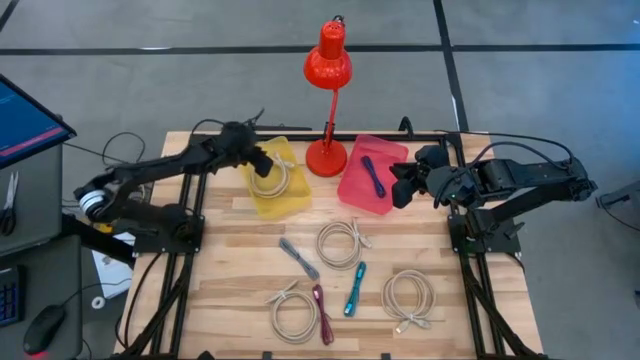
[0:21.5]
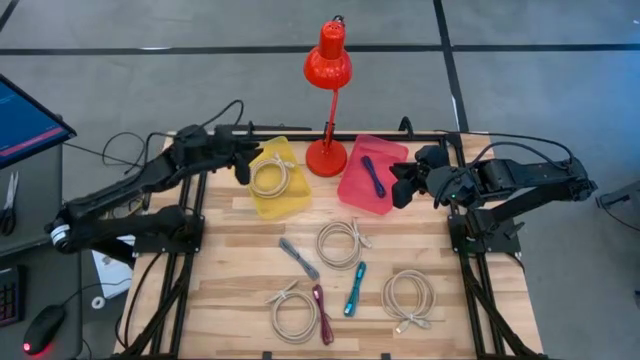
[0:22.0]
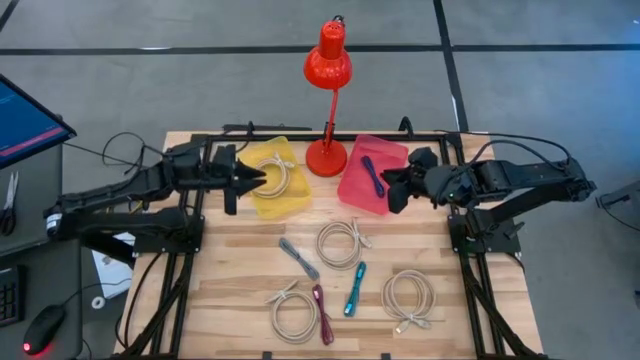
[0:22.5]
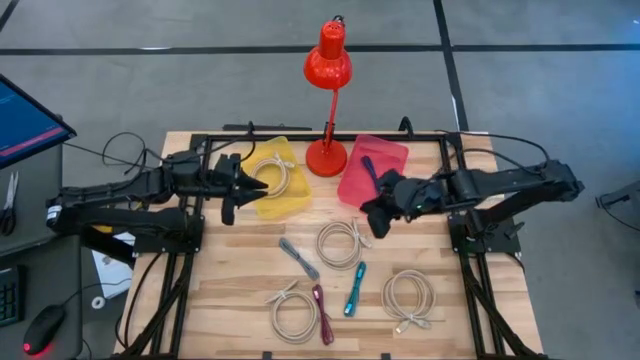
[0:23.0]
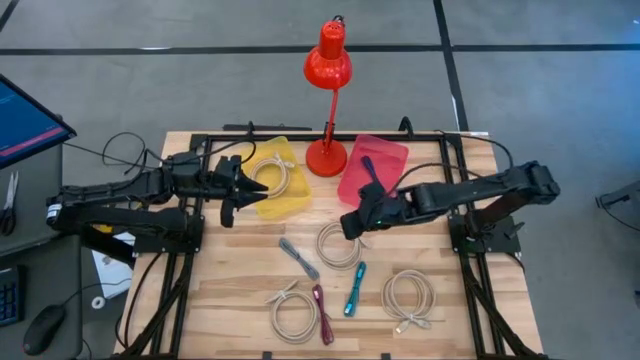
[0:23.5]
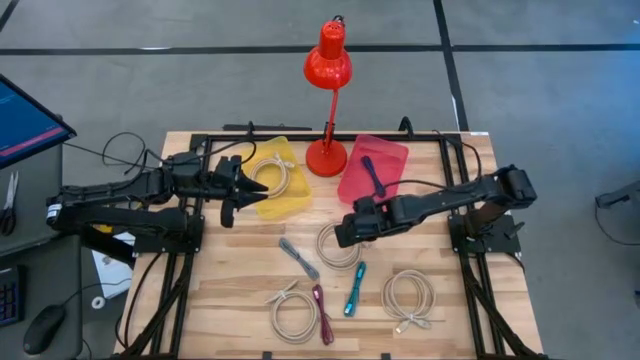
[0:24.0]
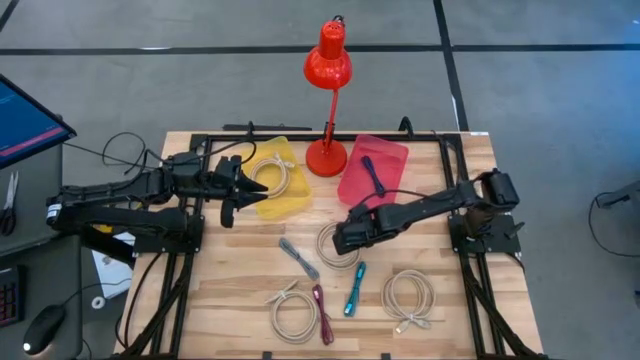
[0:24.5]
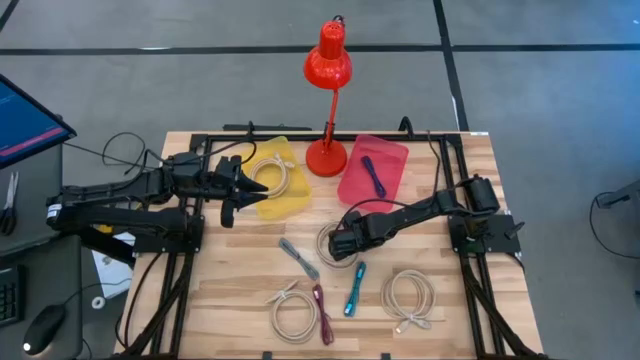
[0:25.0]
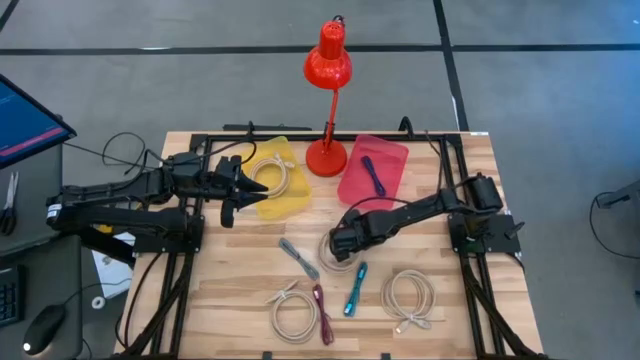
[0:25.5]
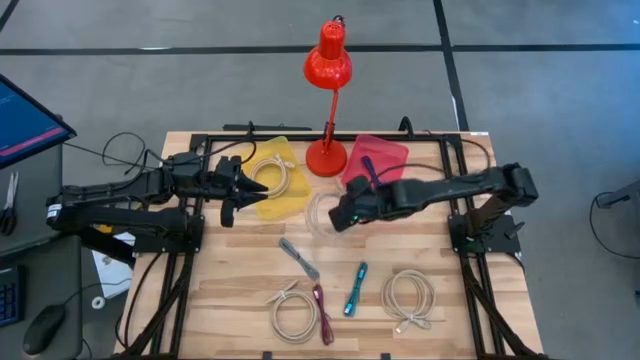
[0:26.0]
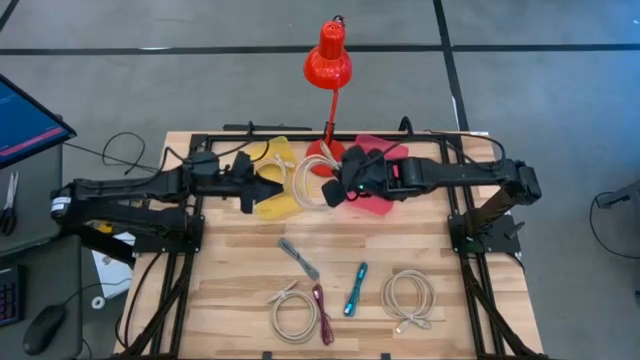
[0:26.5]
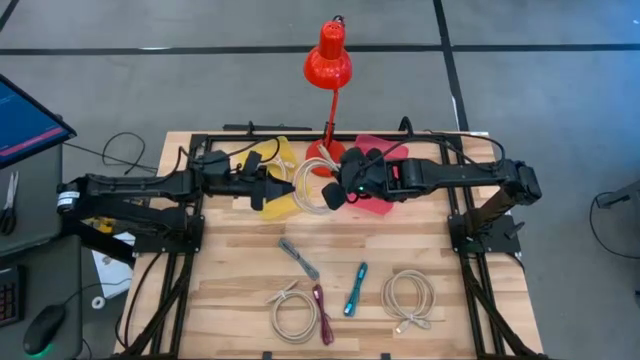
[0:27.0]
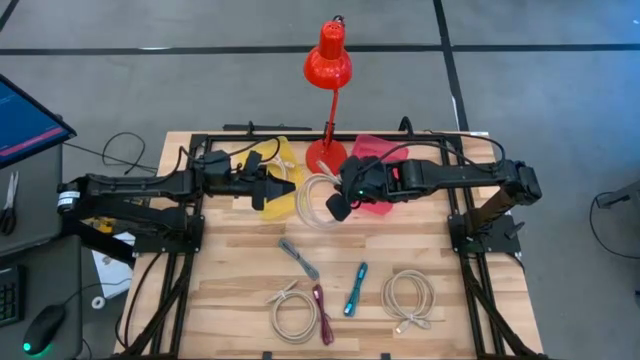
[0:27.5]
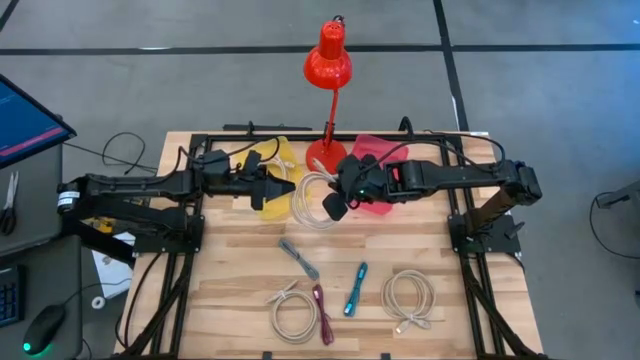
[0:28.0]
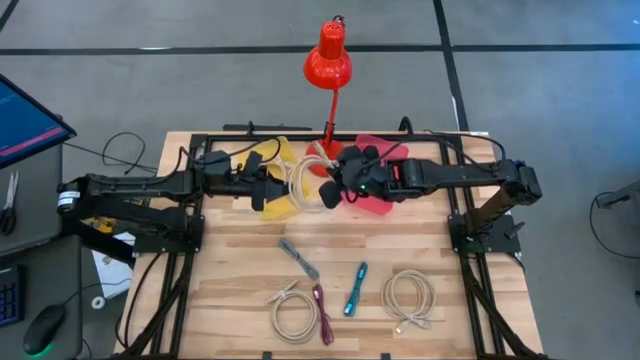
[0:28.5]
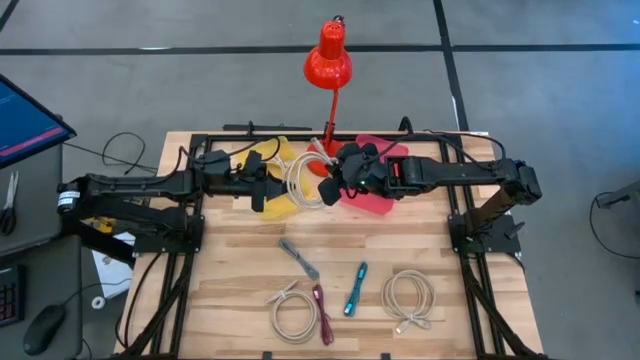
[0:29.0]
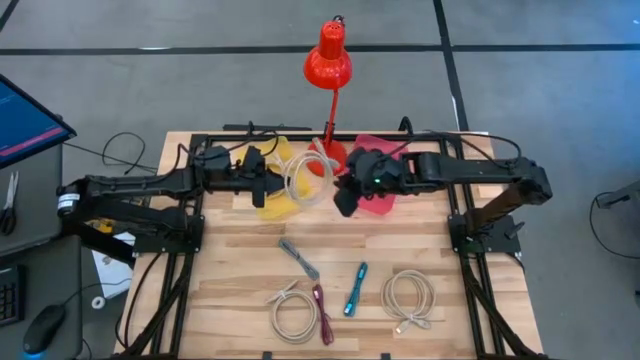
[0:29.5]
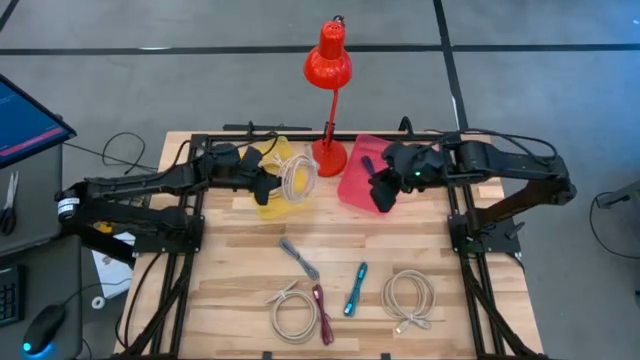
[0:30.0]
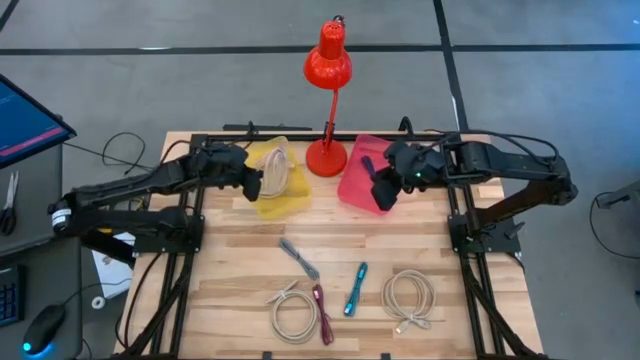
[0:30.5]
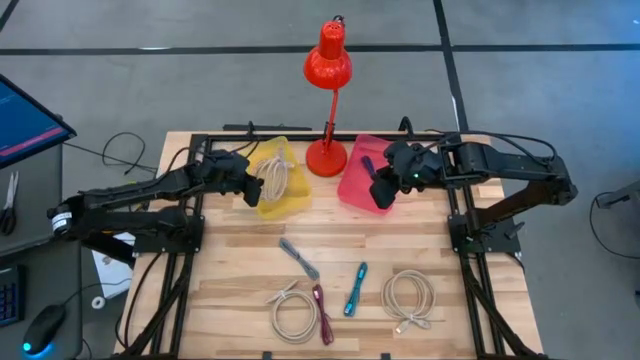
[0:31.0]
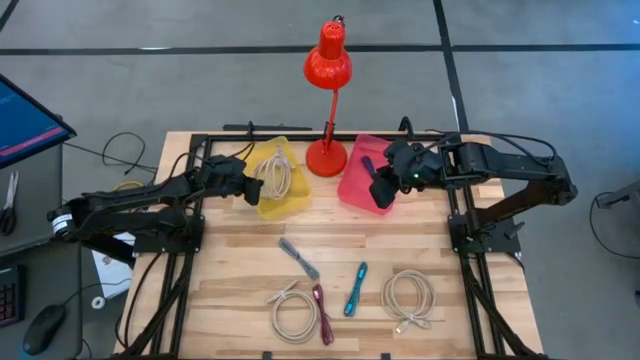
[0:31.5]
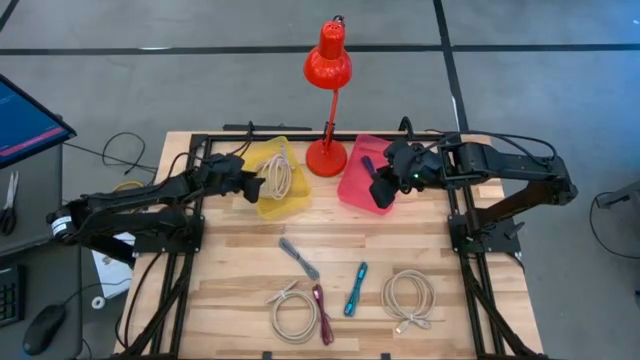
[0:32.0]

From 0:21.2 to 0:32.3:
Task: Pick & Place USB Port
Put the light brown USB cable into the yellow bin

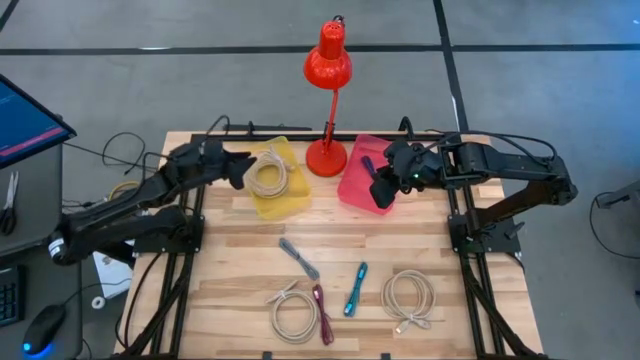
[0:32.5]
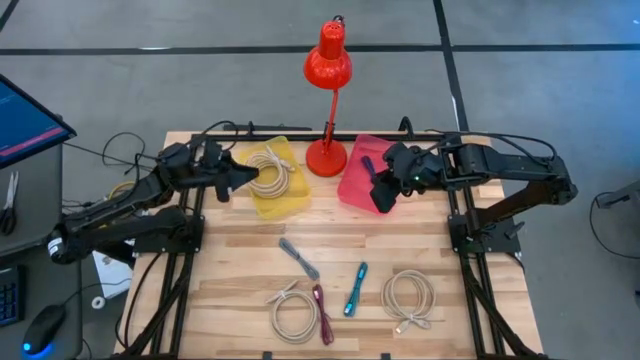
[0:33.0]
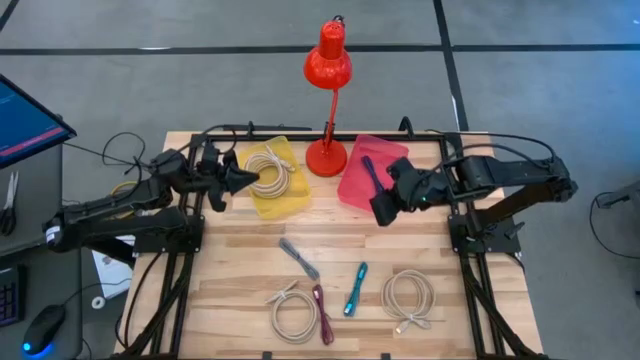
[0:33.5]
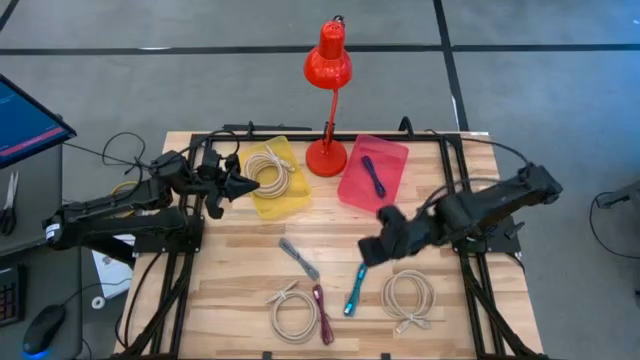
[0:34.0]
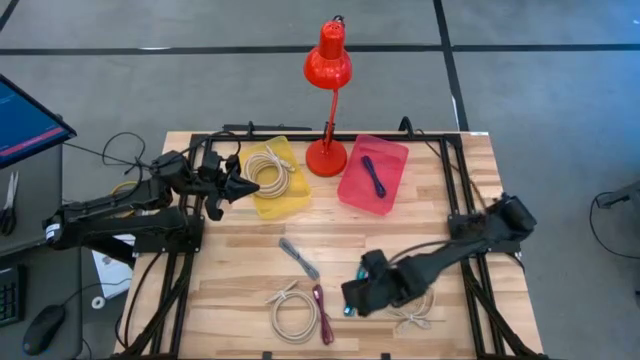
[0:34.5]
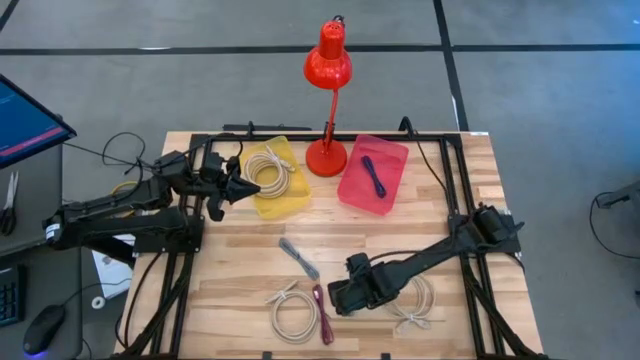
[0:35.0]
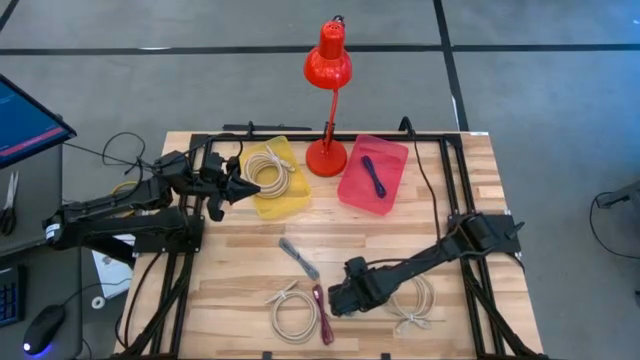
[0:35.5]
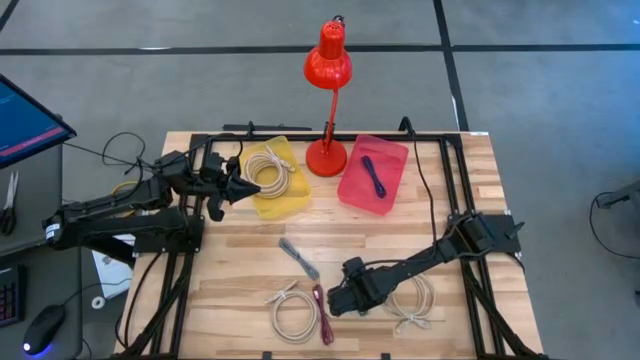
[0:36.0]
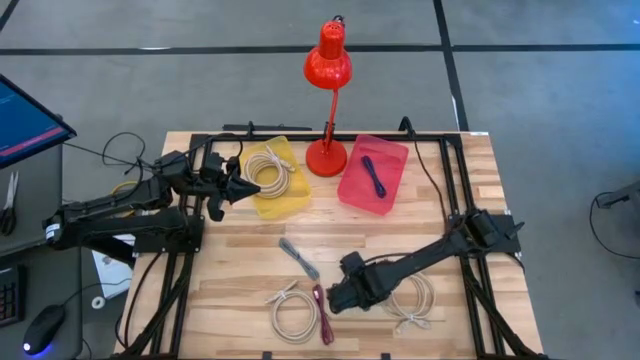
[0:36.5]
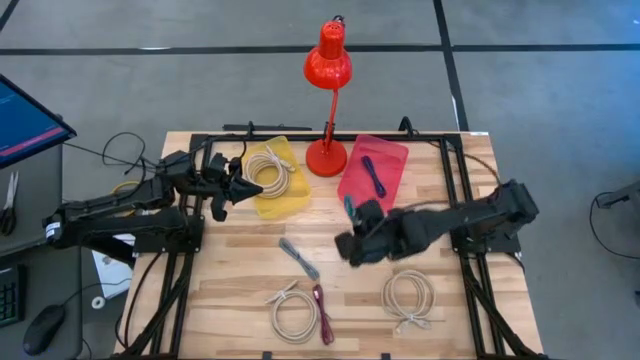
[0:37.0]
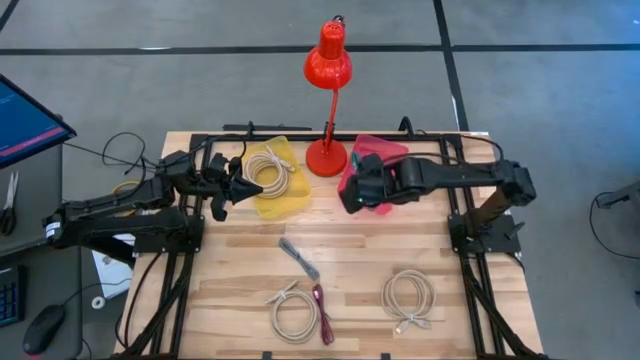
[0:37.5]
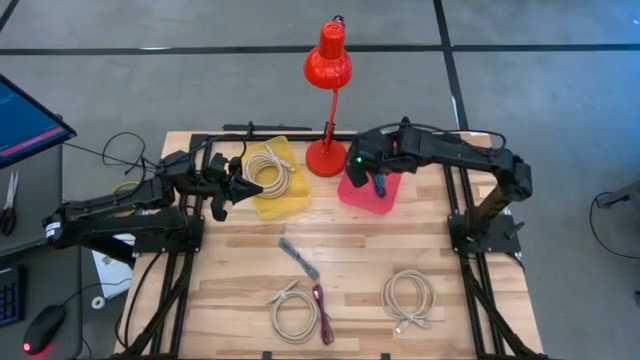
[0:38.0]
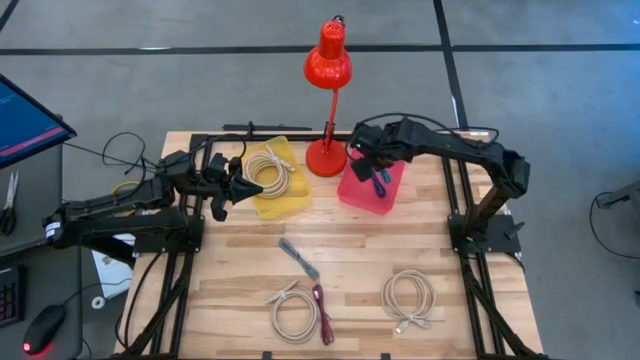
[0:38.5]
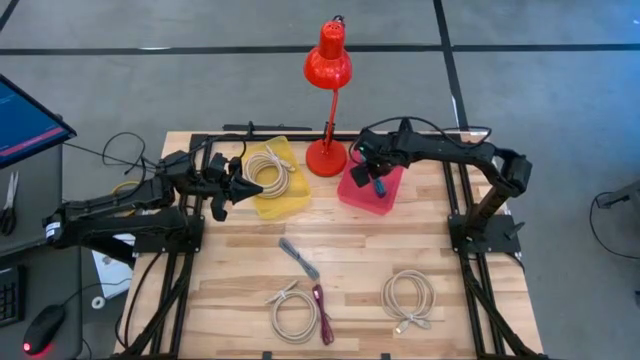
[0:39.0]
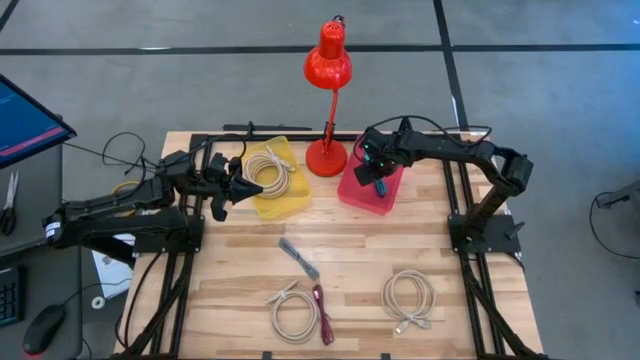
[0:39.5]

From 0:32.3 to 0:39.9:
Put the black and blue charger cable into the pink bin

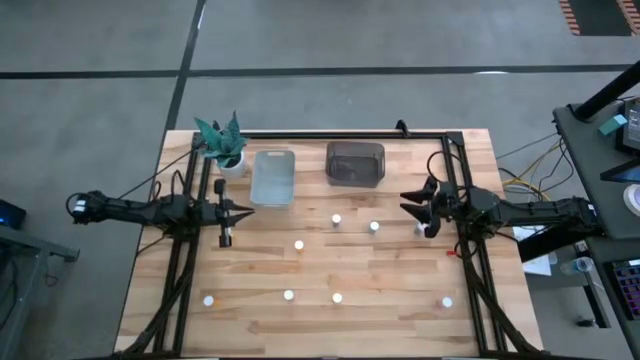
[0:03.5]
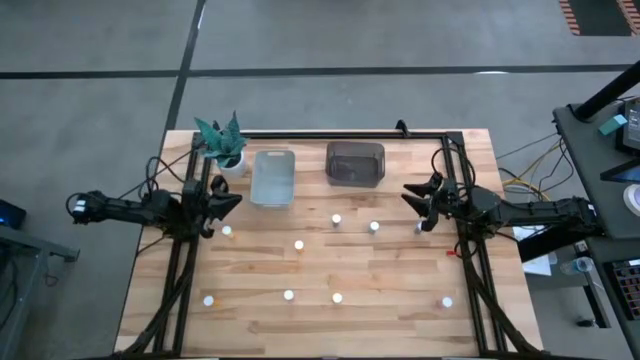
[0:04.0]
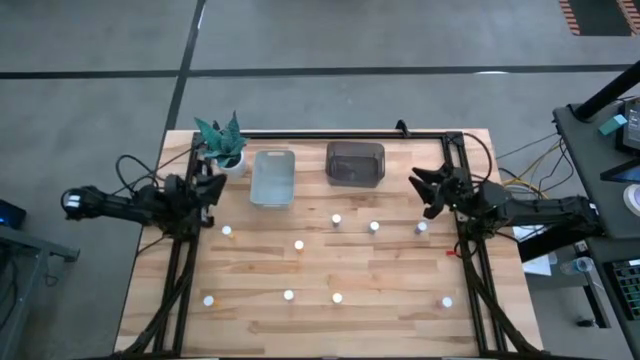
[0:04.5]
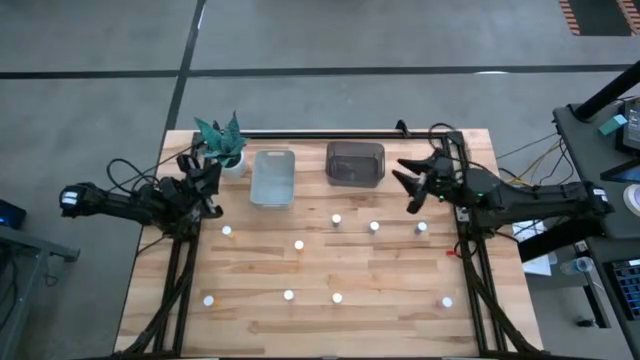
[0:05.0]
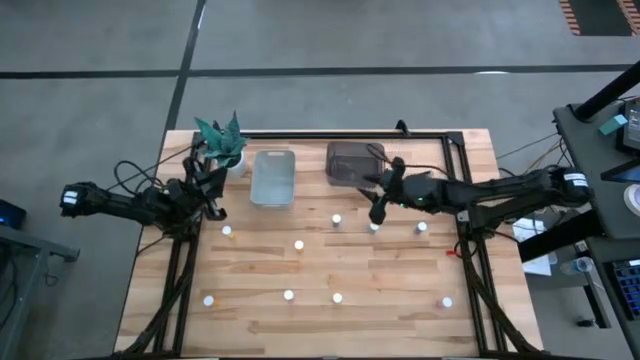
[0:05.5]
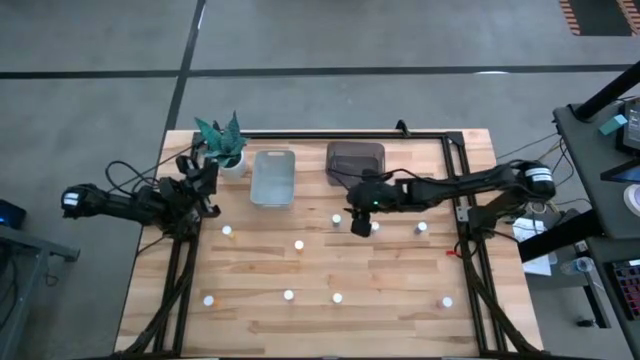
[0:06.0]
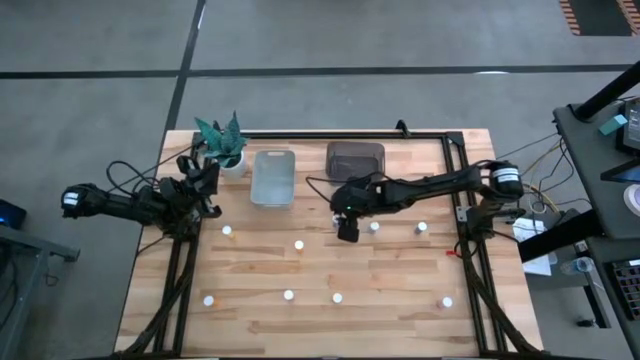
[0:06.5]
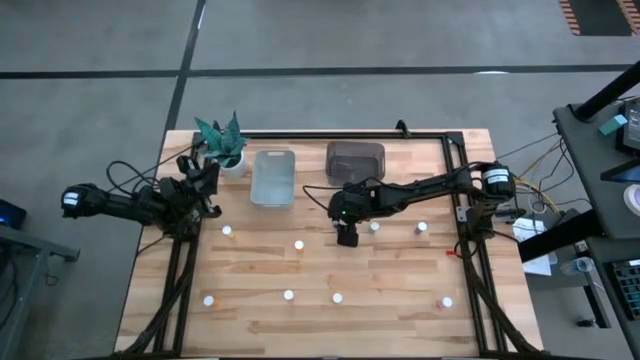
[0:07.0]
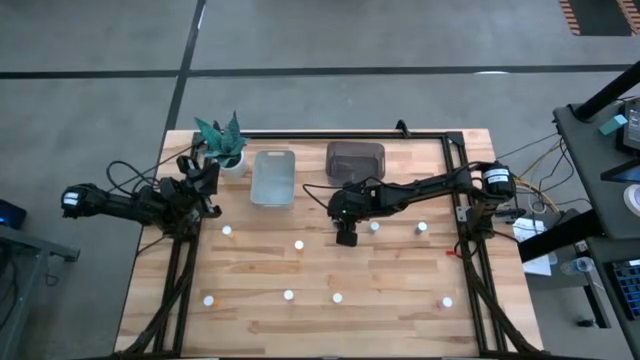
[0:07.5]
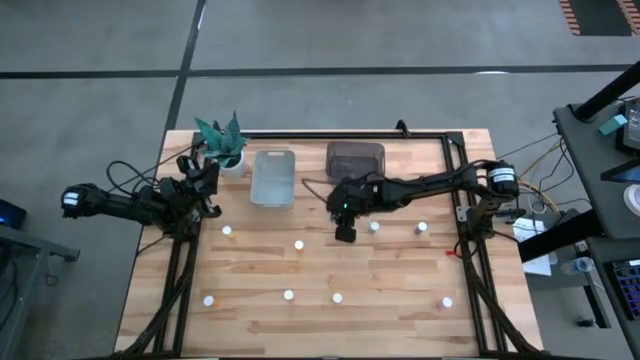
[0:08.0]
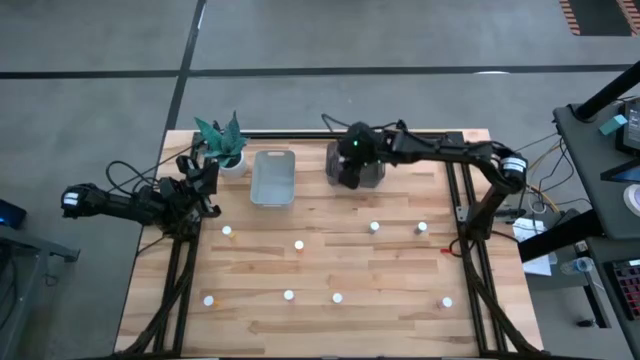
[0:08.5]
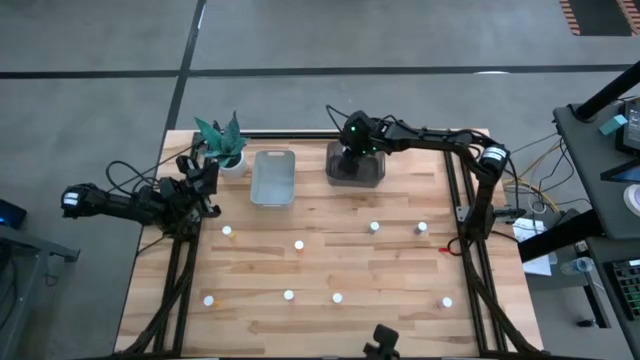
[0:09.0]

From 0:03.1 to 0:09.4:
Task: Pick and place medicine bottles into bin by pill shape (circle, oval)
Put the left blue capsule bottle into the black bin
